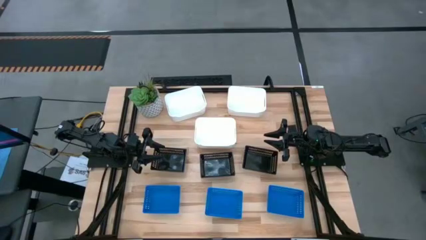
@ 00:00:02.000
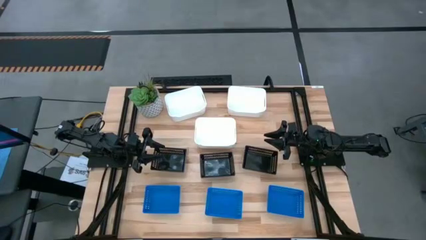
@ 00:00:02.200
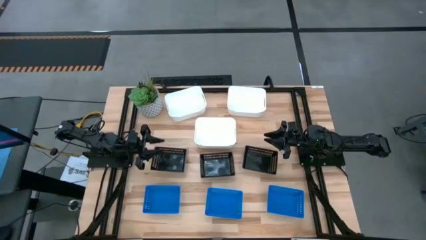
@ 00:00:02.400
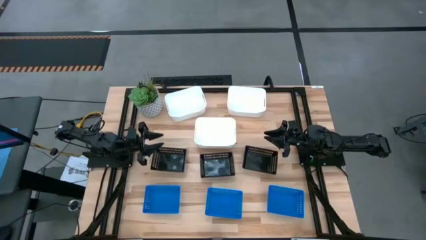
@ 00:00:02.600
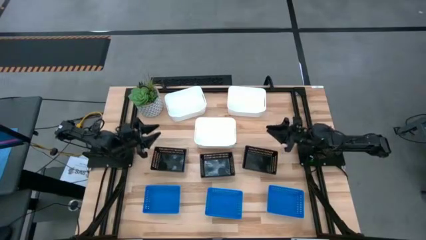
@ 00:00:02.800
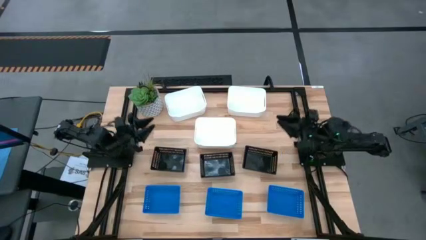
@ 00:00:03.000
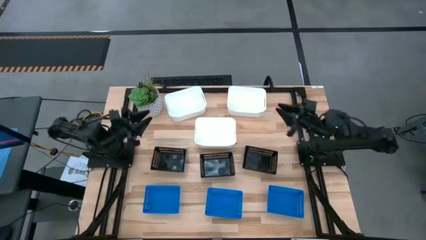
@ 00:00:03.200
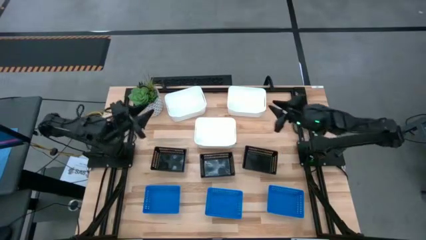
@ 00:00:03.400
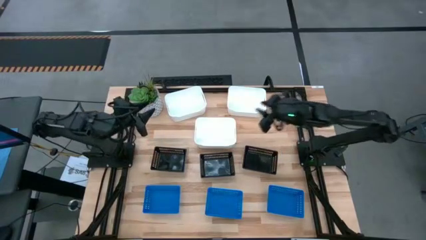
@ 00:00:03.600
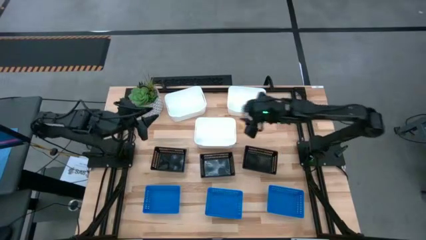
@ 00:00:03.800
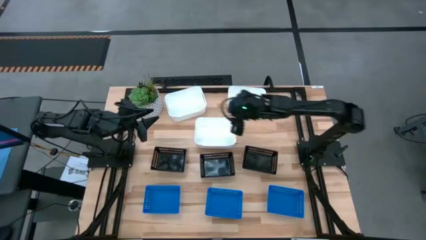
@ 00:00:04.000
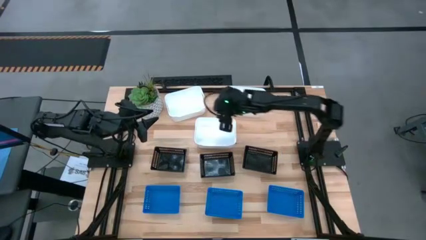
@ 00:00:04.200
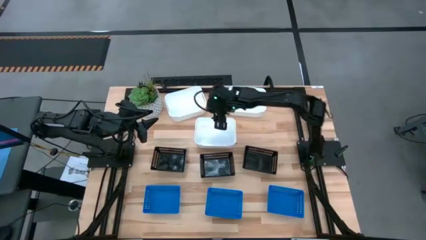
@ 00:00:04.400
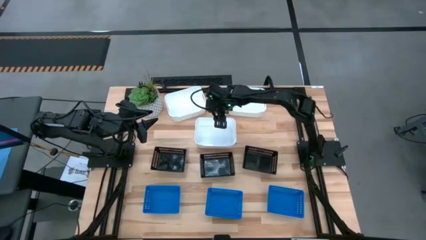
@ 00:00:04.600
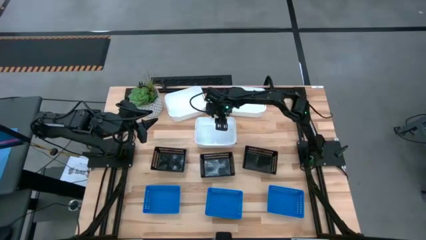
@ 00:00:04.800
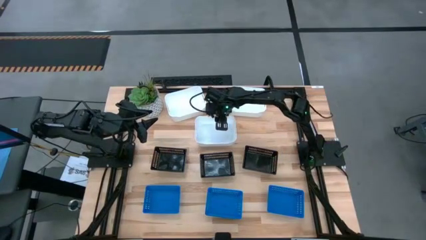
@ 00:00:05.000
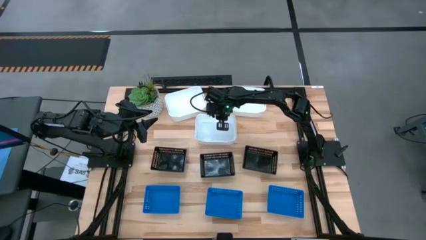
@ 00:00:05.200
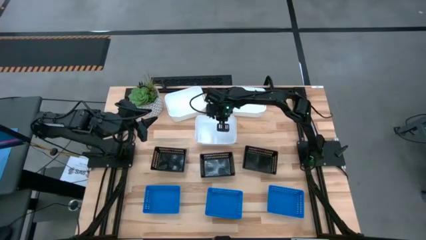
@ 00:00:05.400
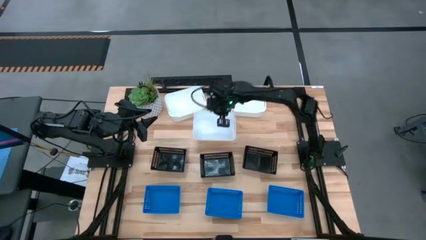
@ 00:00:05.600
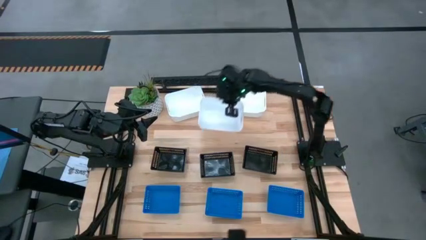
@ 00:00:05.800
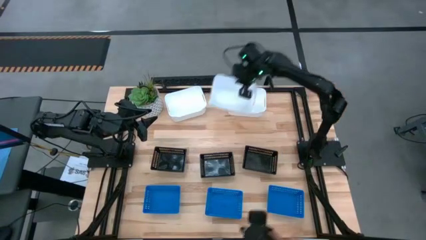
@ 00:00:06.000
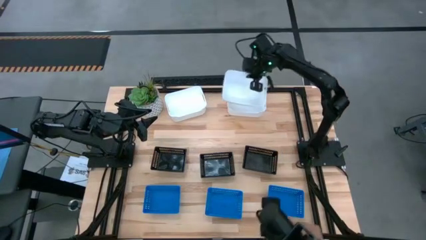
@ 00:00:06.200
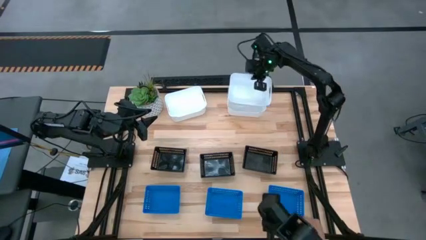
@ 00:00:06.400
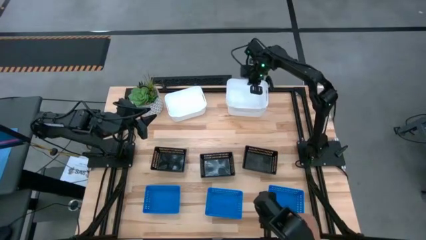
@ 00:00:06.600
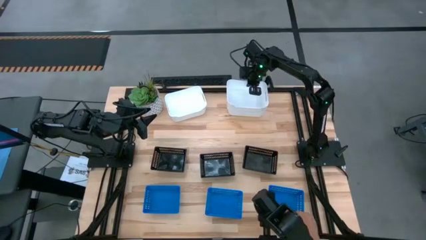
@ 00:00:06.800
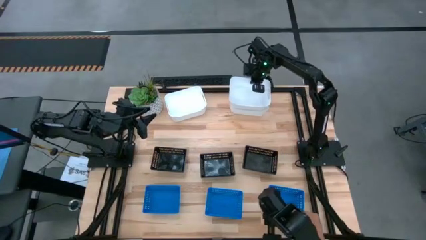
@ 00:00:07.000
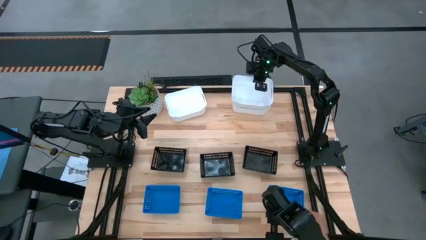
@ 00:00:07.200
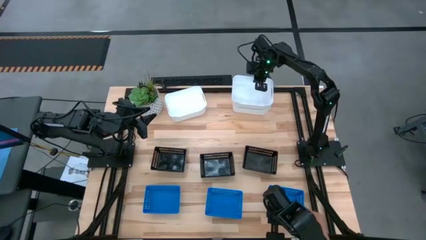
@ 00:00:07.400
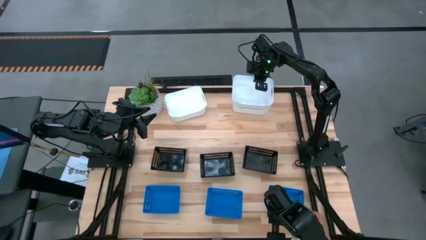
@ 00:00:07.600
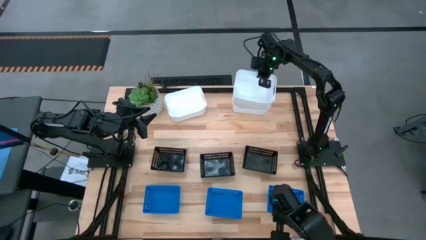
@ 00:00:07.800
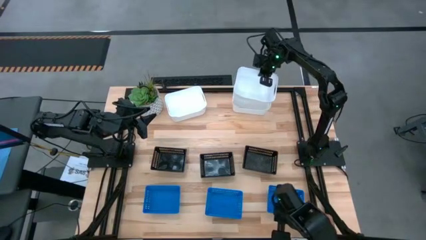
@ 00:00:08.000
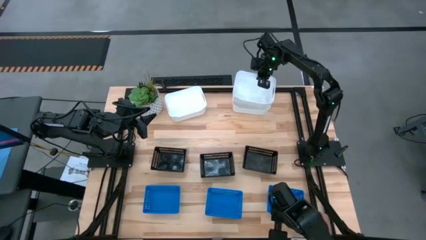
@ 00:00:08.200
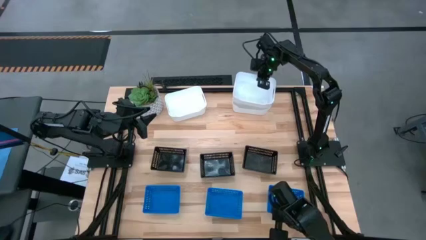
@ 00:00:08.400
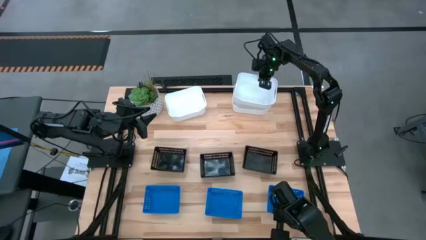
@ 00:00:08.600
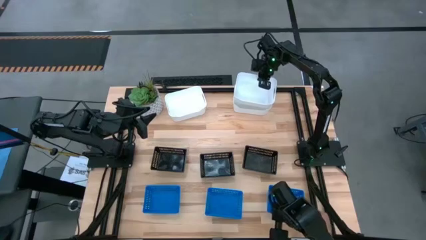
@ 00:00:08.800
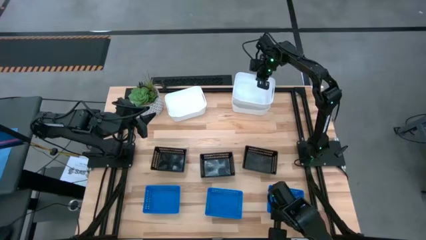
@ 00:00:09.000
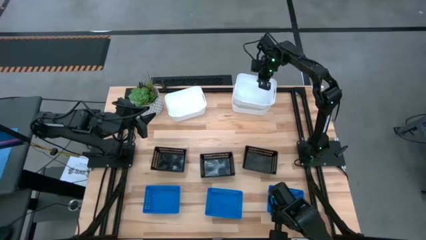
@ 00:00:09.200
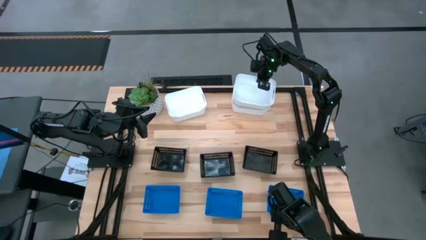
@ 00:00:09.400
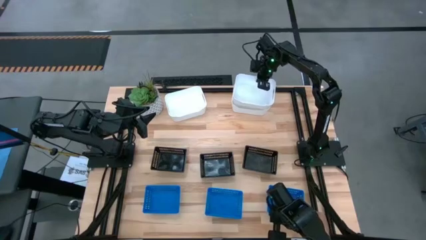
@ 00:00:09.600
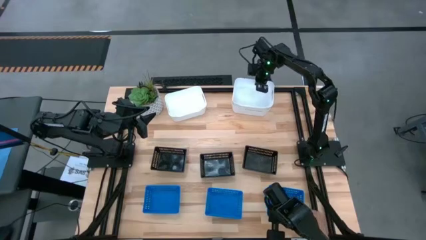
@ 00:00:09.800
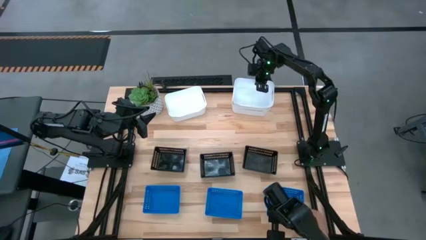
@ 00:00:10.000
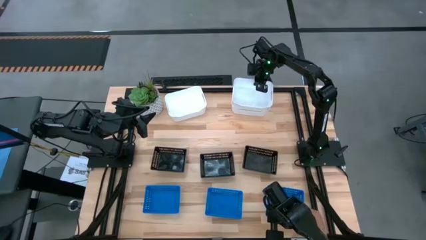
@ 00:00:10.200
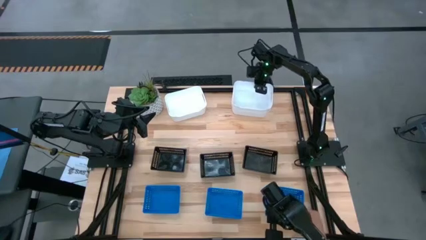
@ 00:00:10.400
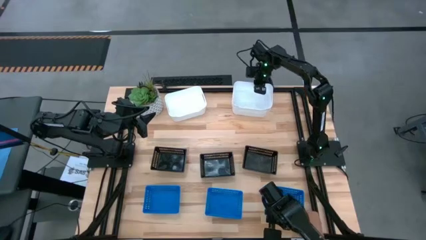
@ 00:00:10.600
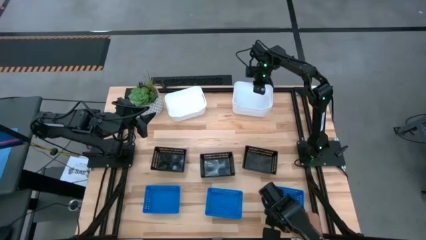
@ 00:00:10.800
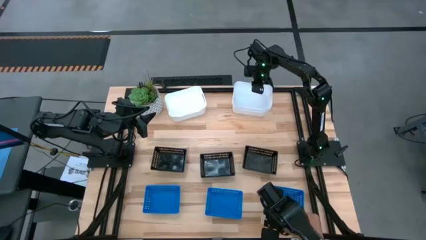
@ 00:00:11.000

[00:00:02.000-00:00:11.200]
Stack the bottom center white bin on the top right white bin

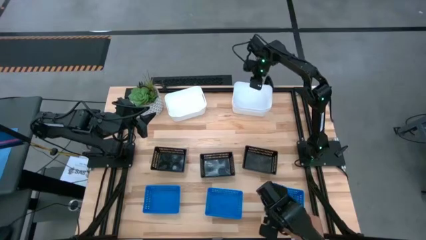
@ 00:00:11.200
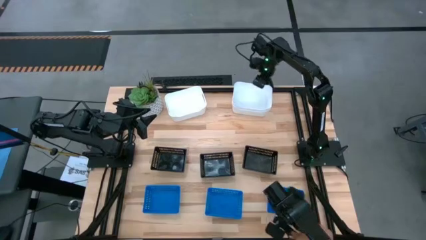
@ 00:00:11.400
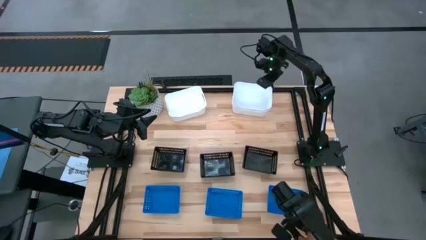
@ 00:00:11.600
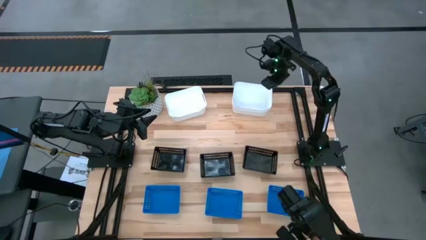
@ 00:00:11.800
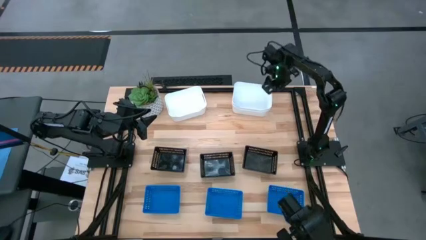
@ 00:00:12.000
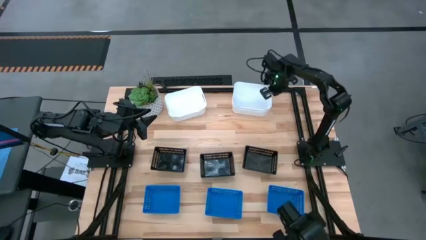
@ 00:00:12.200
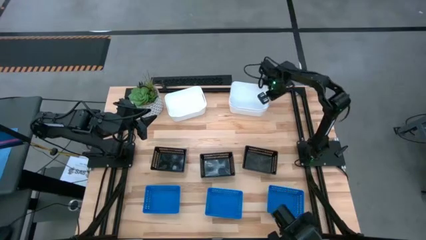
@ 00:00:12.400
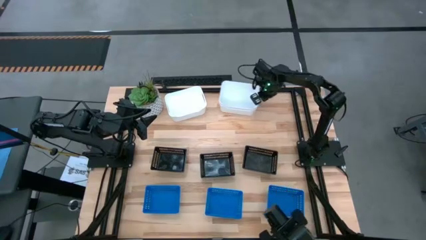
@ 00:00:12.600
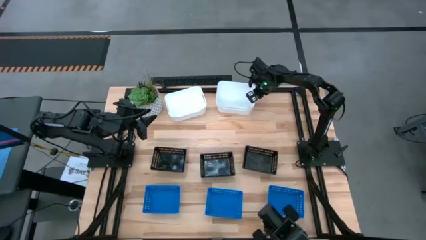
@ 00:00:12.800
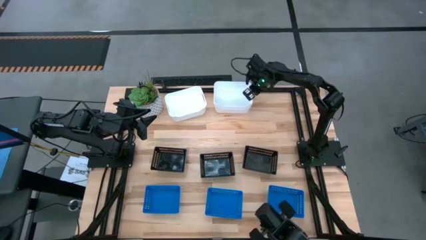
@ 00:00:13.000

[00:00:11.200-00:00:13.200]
Move the stacked white bins to the top center of the table

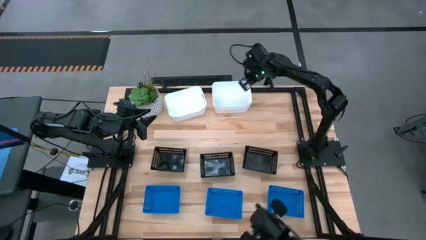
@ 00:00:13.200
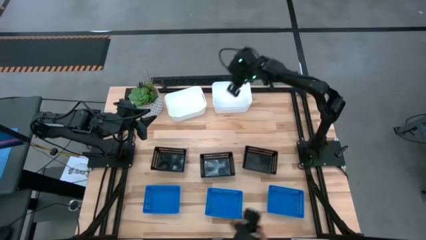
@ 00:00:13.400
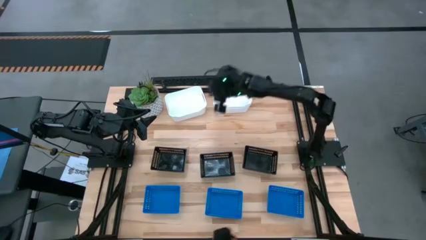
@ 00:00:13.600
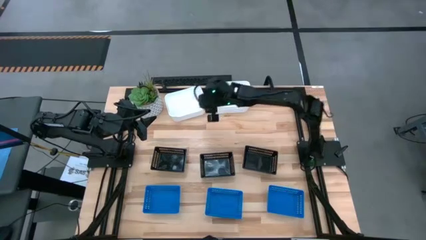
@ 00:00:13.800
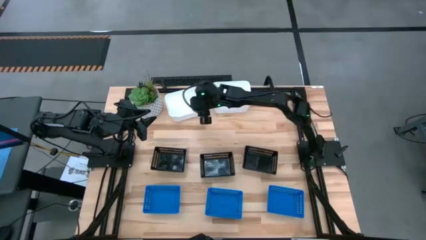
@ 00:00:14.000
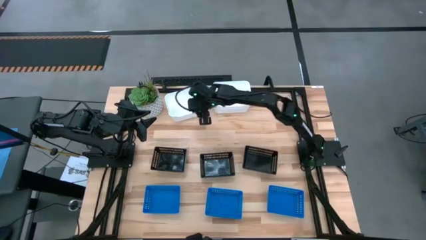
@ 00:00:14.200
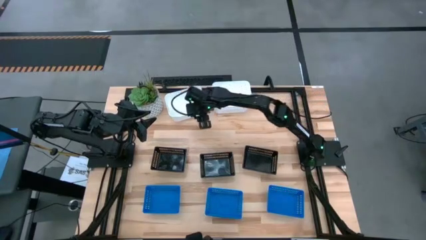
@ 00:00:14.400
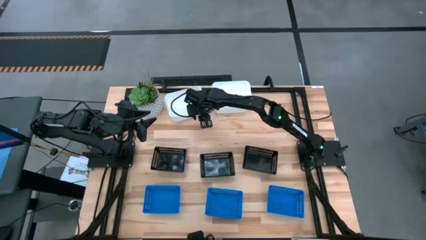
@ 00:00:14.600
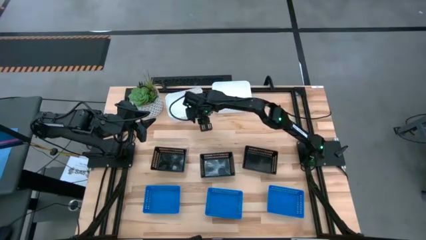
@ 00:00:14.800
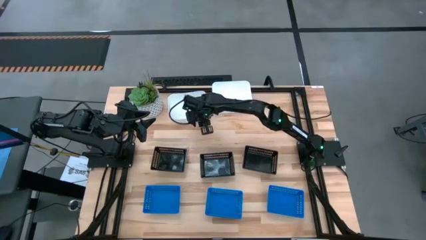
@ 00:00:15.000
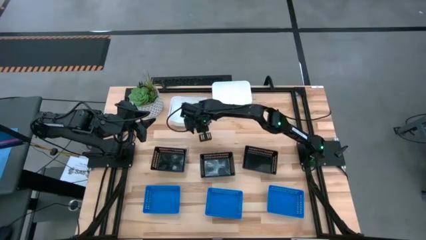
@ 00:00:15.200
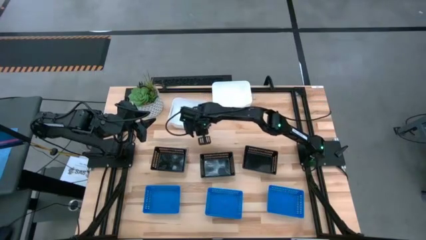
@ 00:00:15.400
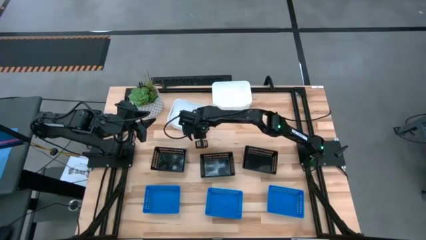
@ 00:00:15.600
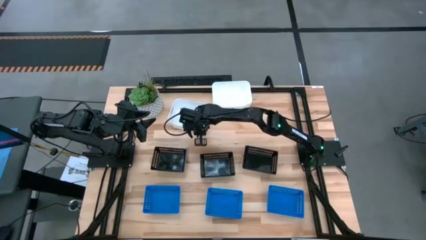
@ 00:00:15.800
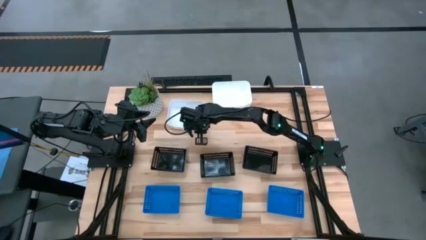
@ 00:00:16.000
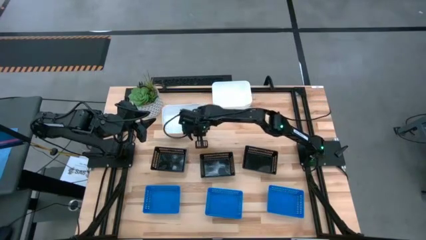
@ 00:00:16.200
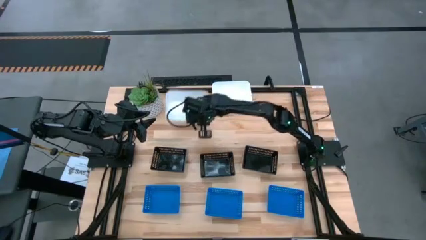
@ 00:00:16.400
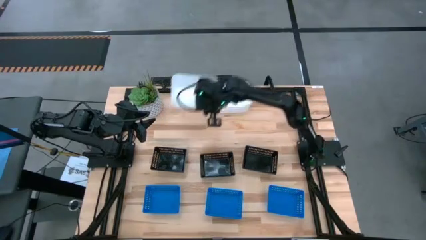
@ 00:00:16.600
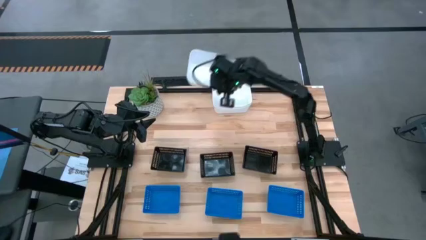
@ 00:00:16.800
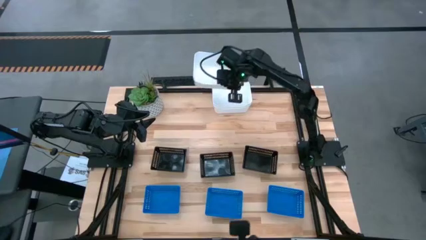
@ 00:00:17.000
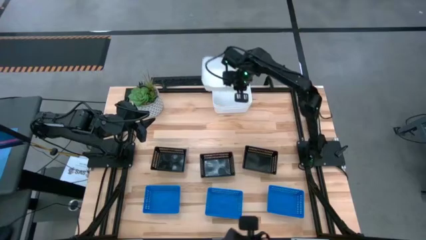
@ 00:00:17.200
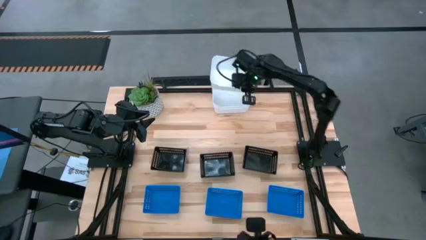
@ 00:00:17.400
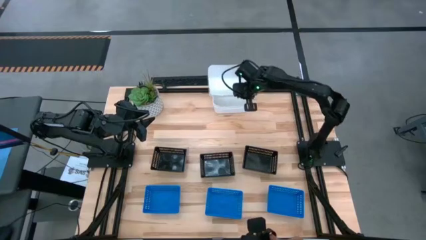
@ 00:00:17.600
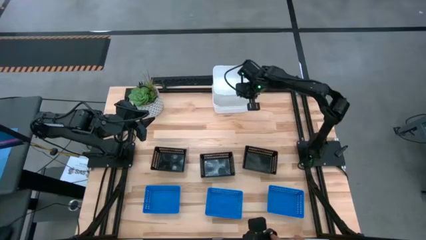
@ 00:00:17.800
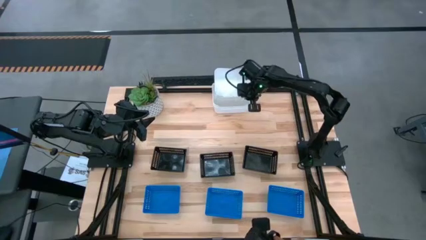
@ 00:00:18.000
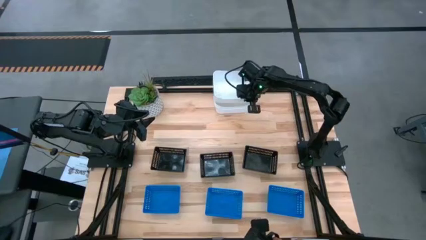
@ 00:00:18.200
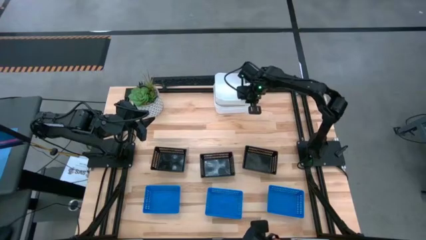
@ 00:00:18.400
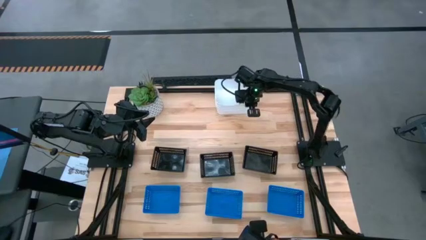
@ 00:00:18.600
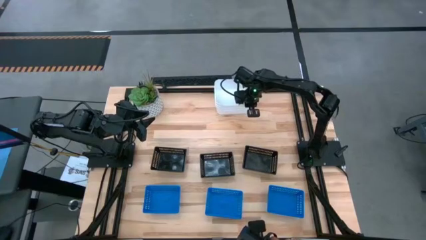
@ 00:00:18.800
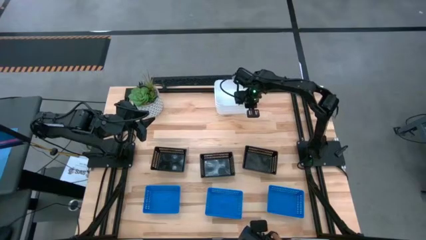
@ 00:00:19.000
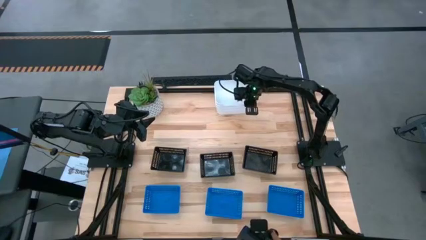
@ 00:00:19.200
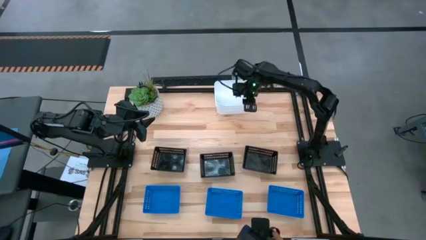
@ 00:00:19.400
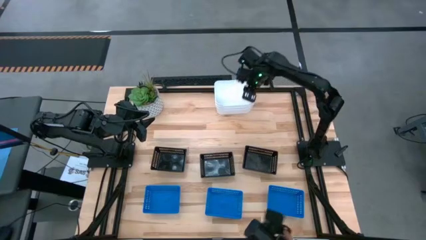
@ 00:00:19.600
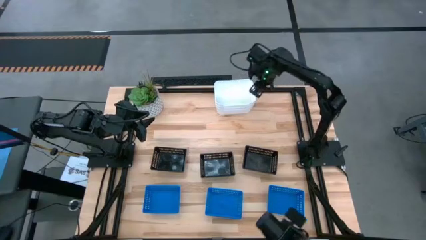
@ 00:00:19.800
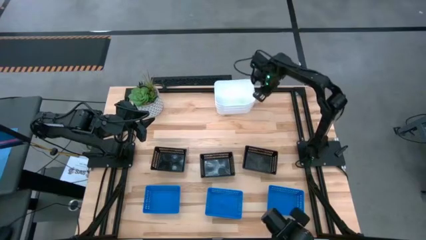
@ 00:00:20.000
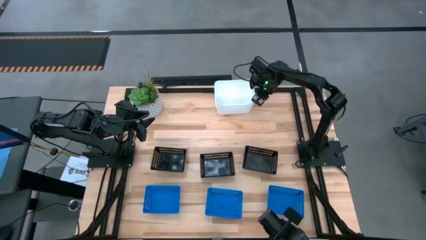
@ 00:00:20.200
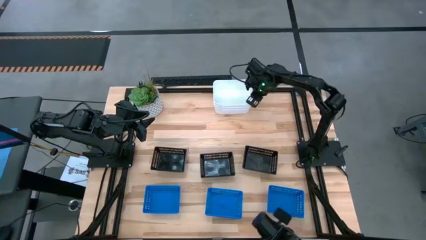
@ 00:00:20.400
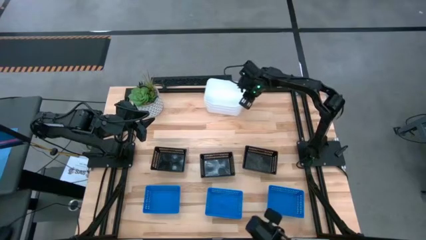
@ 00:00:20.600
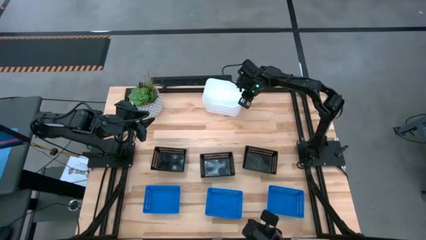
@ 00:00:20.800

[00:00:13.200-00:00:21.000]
Stack the left white bin on the right white bin
